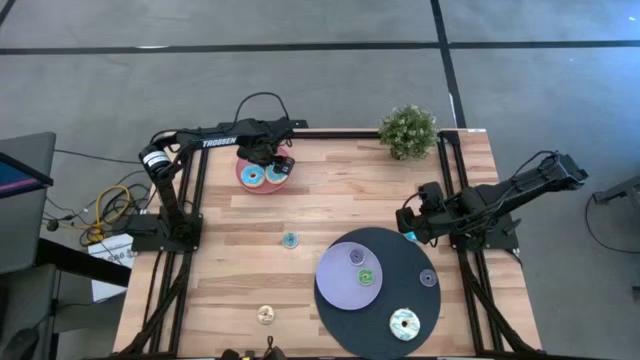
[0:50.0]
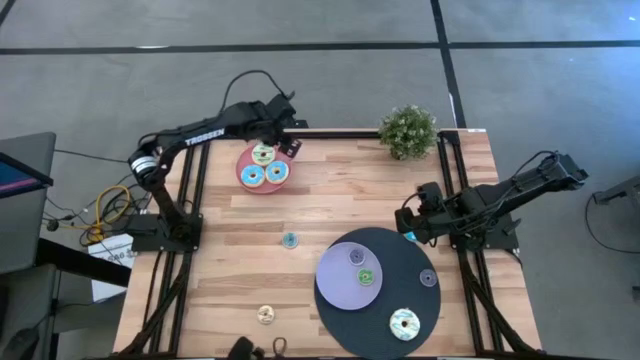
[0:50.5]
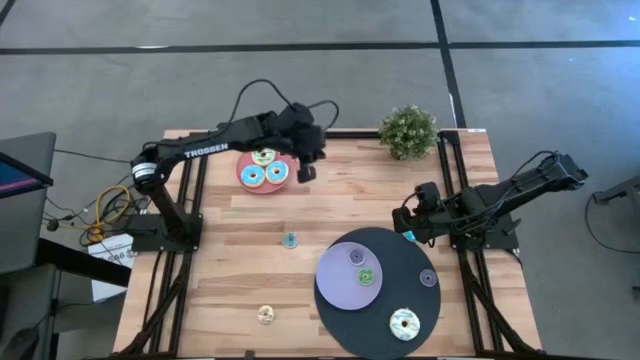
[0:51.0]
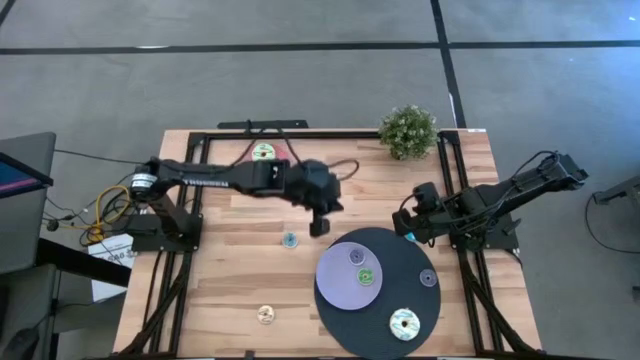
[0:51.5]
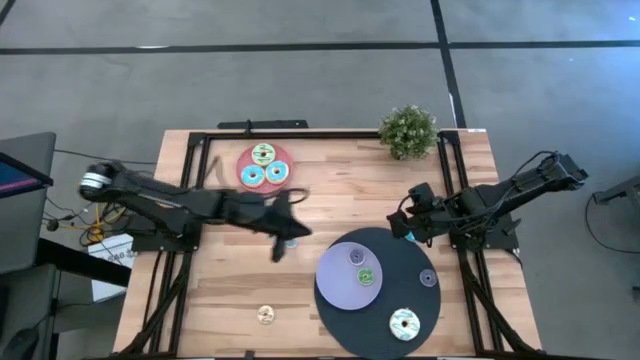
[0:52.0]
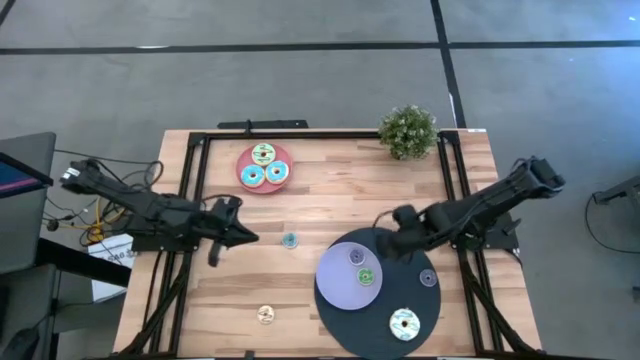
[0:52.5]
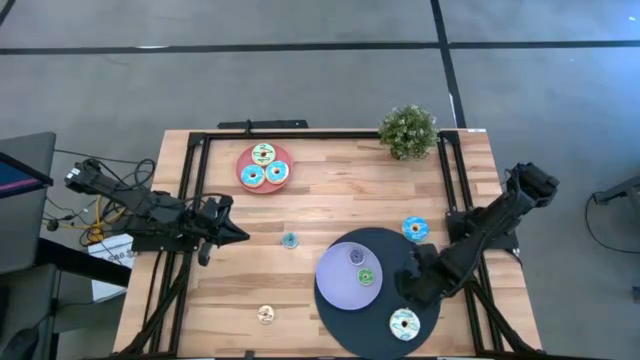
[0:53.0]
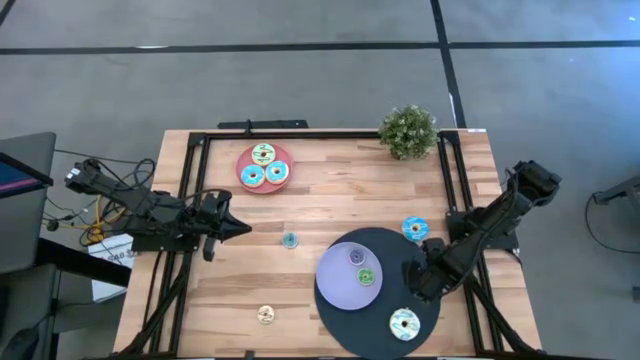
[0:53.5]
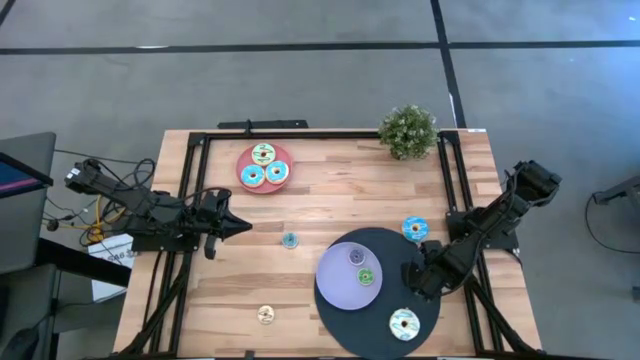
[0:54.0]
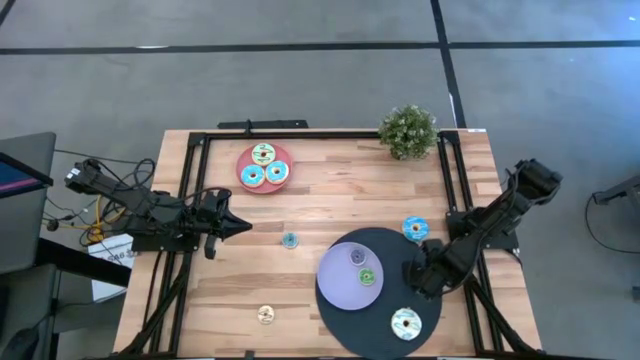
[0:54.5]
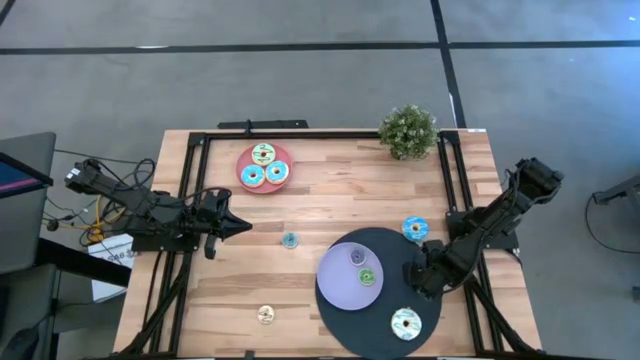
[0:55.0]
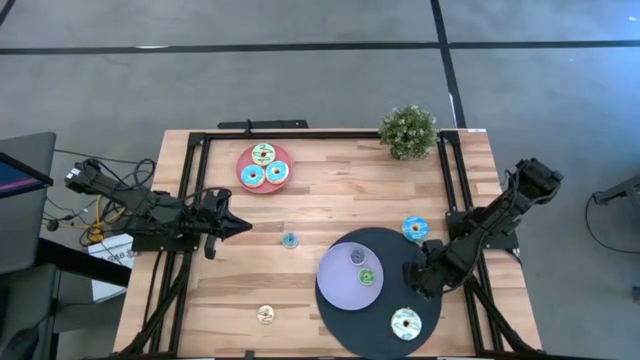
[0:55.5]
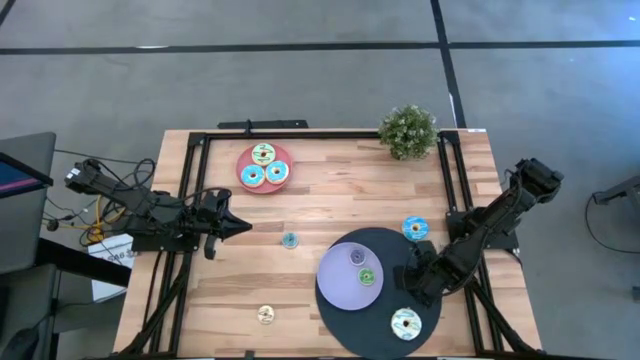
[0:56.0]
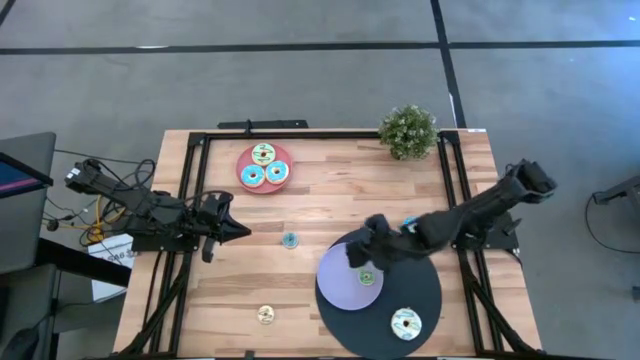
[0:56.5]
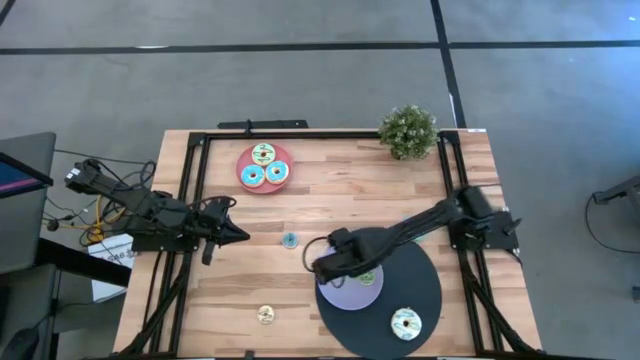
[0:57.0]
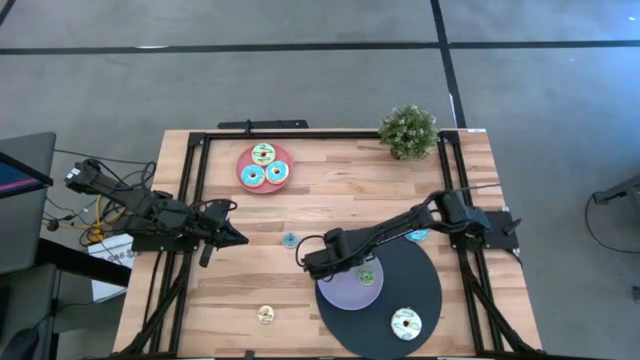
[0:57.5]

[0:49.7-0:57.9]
Task: Pick & Place donuts
Put the small purple donut on the purple plate

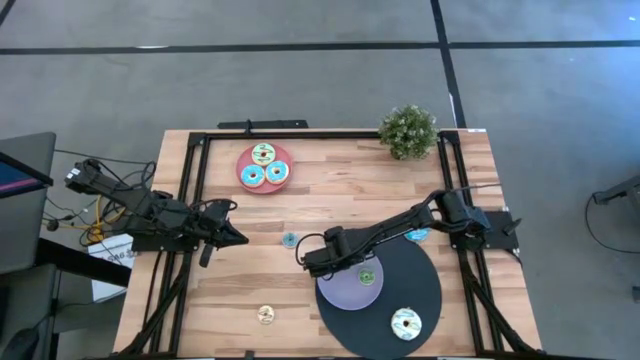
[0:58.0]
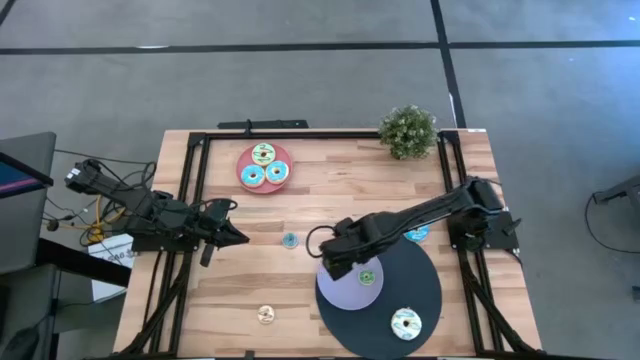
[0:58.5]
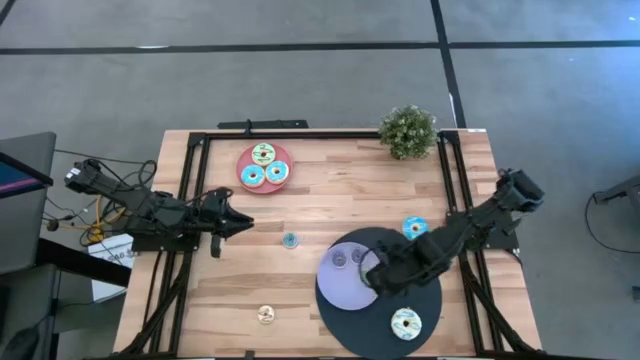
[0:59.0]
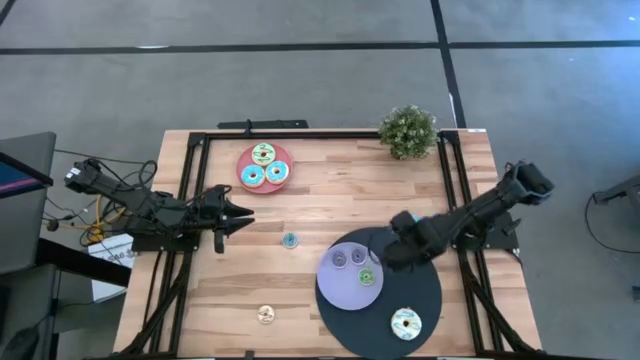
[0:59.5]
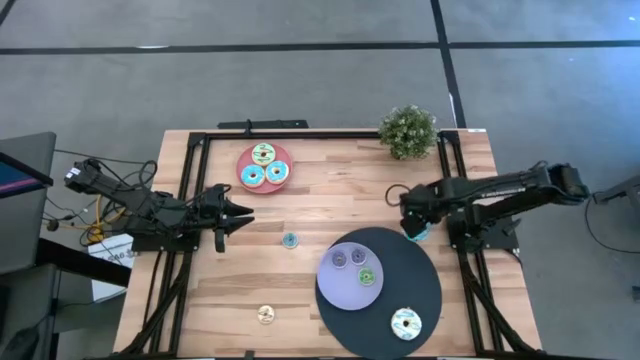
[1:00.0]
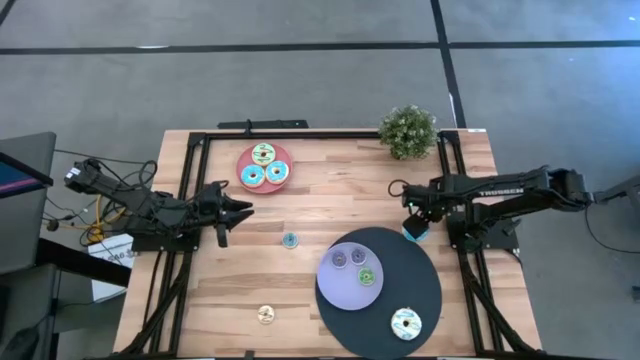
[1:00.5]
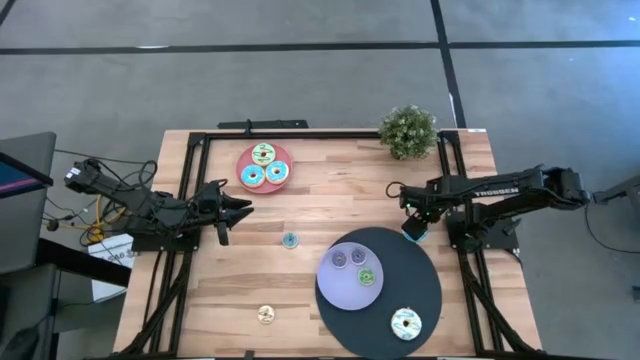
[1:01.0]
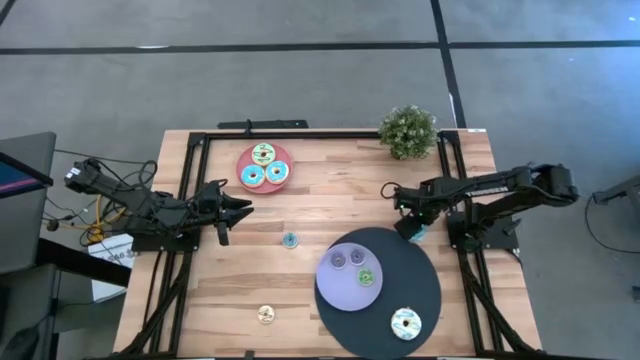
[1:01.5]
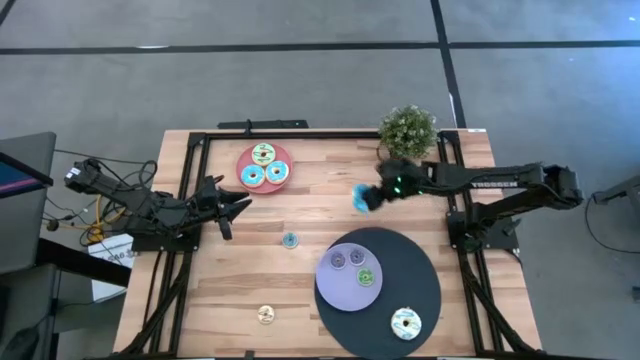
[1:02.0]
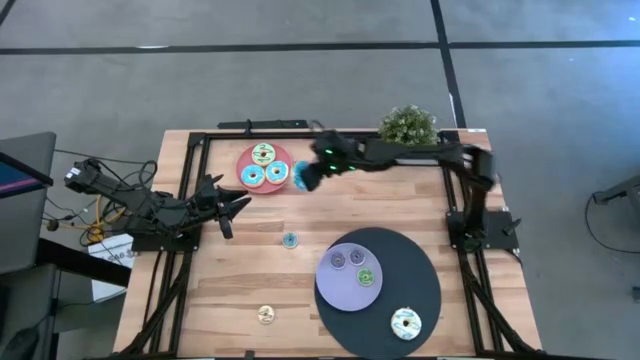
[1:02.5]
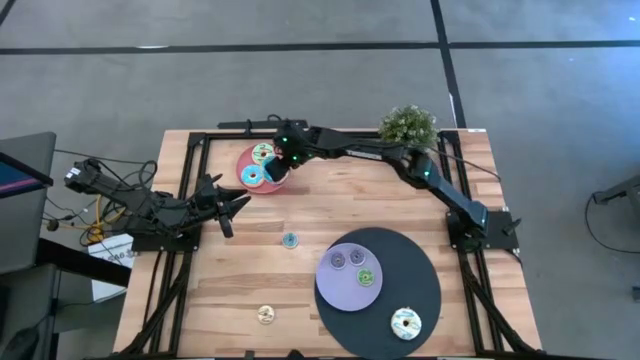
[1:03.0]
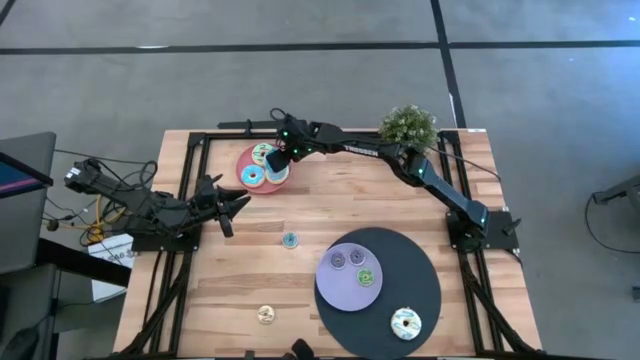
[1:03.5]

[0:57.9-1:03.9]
Put the large blue donut on the pink plate

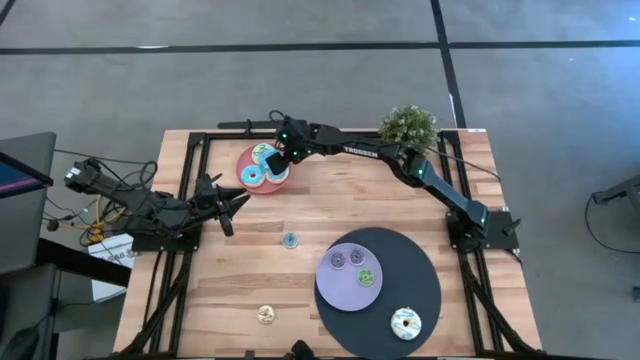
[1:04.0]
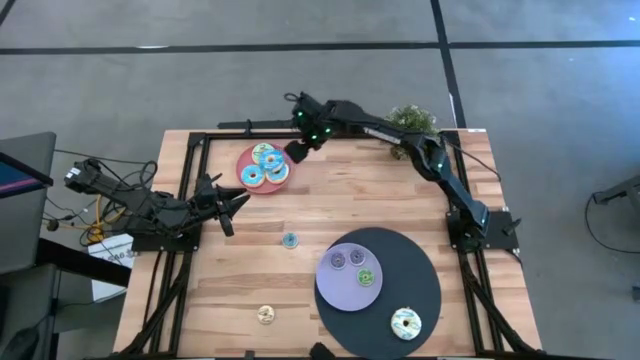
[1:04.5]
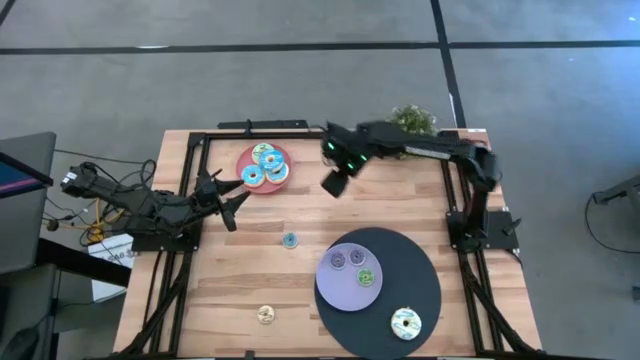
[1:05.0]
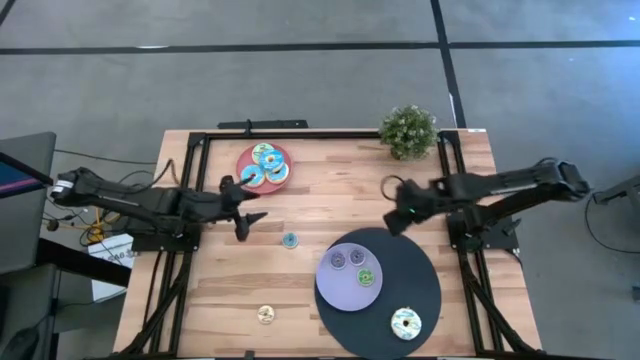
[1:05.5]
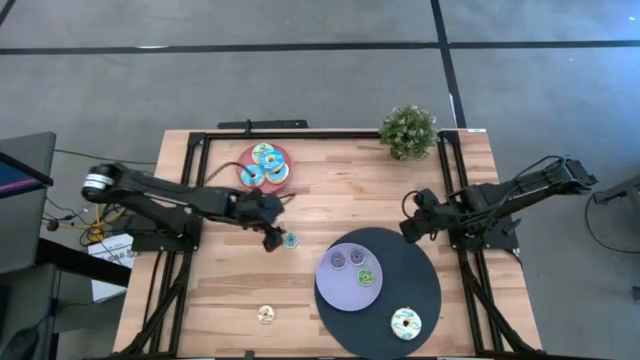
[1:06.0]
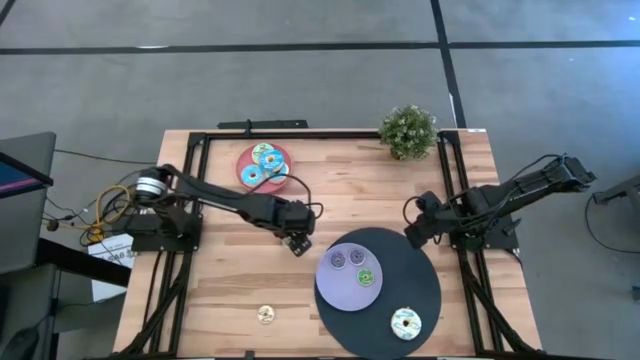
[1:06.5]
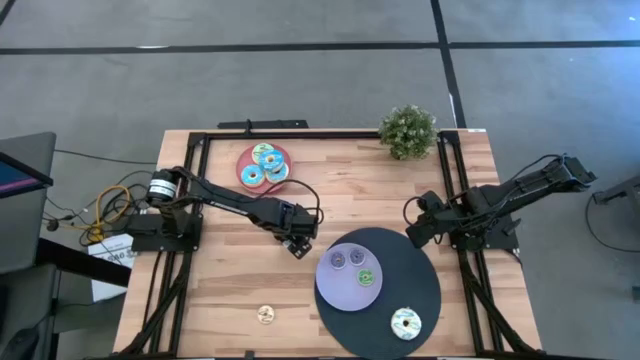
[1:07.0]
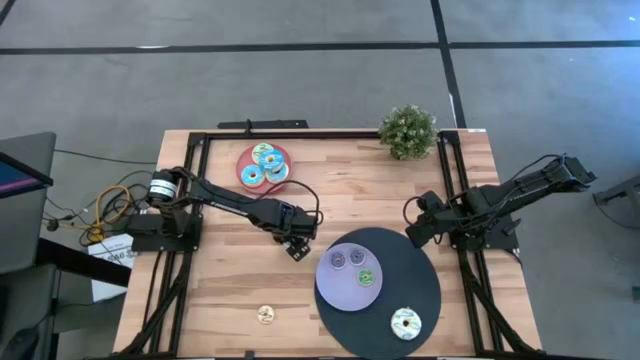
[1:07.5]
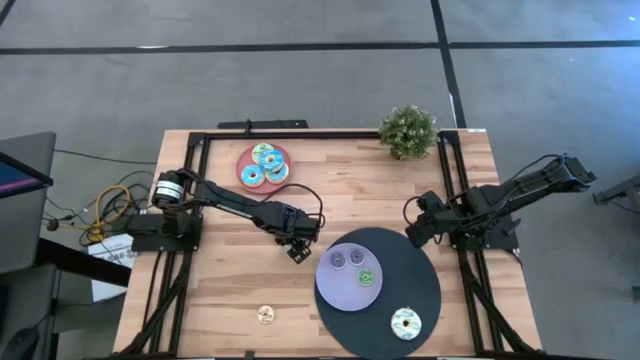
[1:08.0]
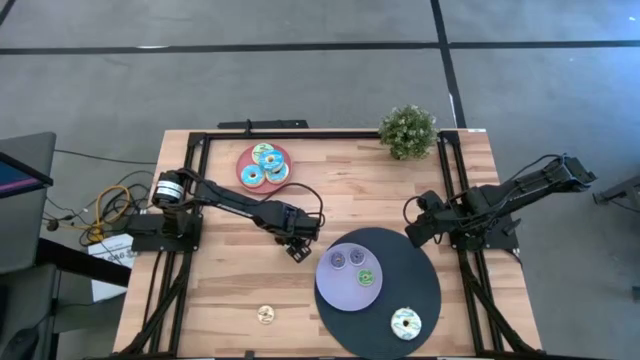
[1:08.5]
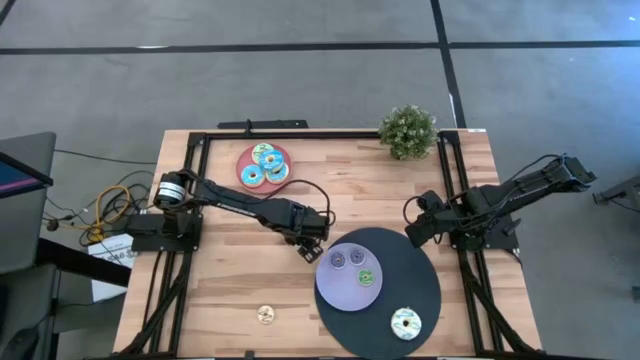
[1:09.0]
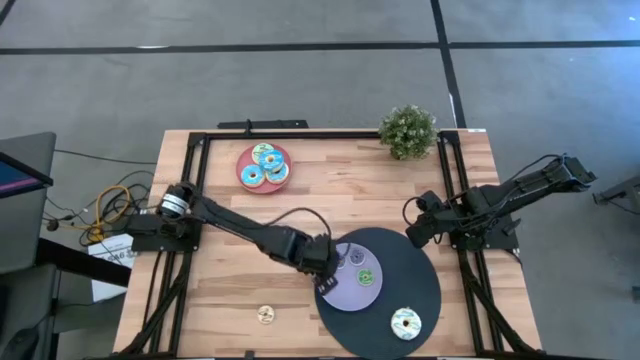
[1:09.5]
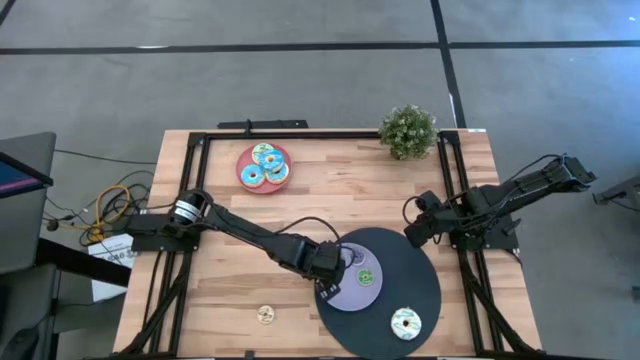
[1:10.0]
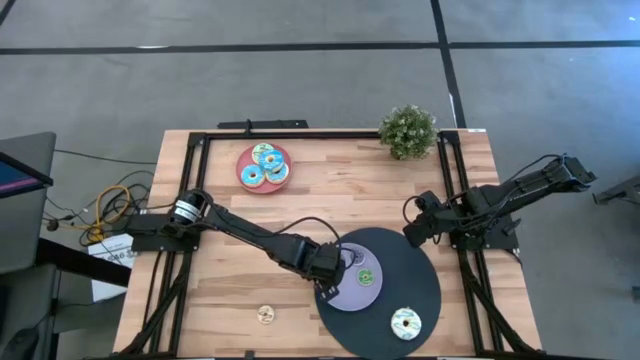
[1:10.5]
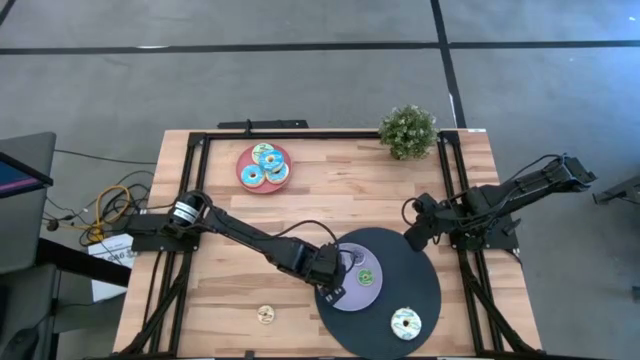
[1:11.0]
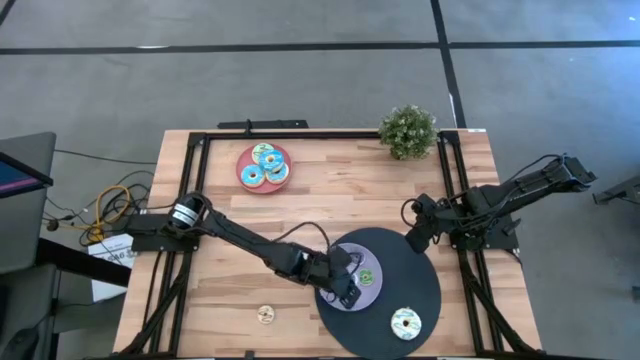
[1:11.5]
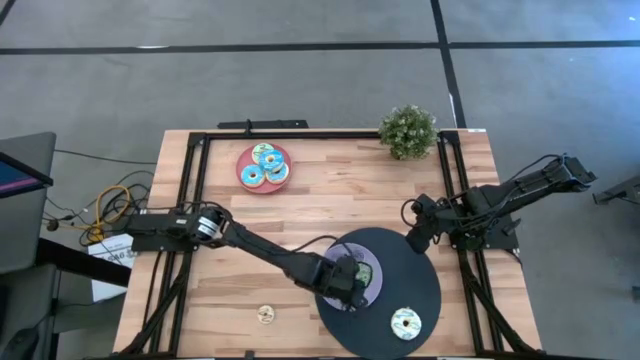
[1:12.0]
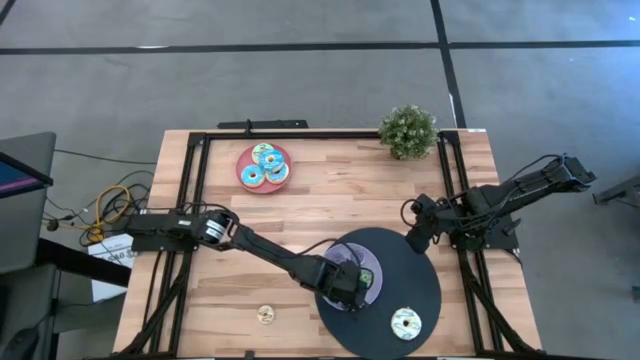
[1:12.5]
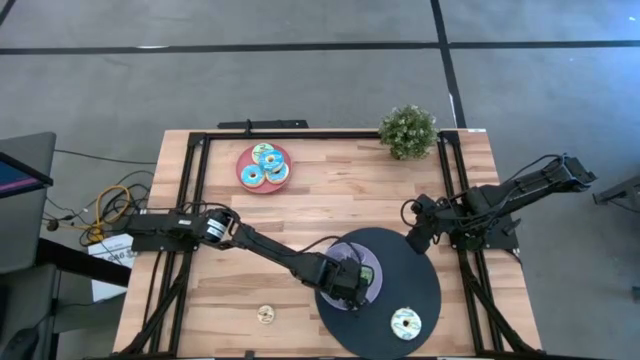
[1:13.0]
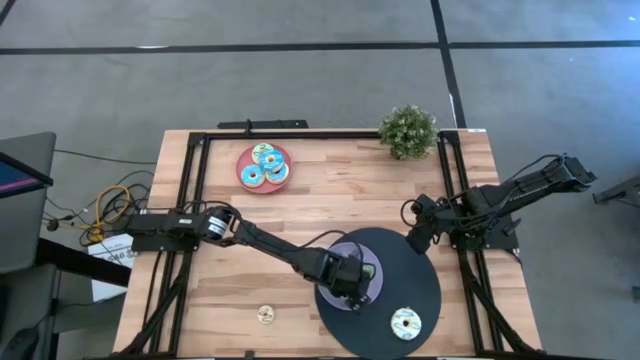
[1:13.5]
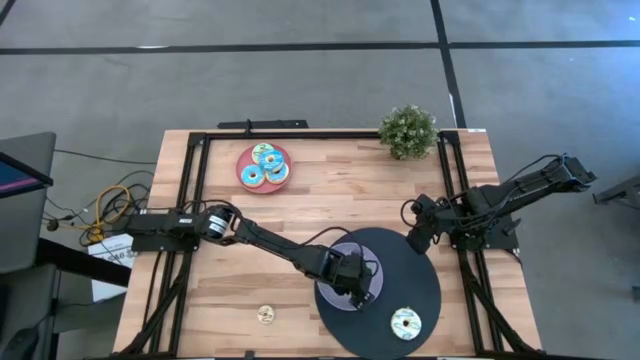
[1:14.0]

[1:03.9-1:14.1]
Put the small blue donut on the purple plate
